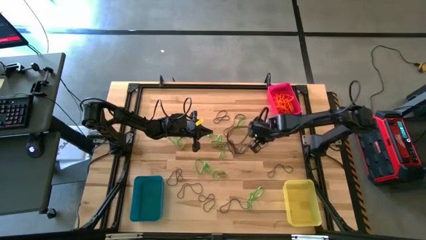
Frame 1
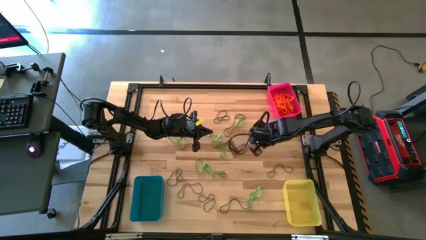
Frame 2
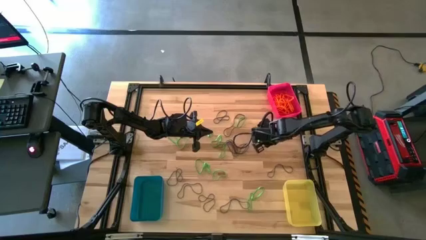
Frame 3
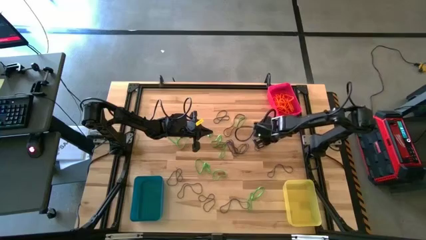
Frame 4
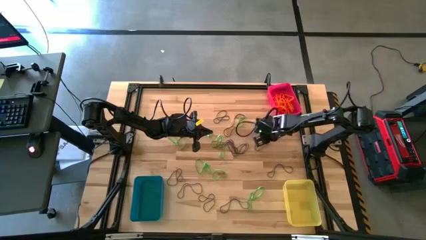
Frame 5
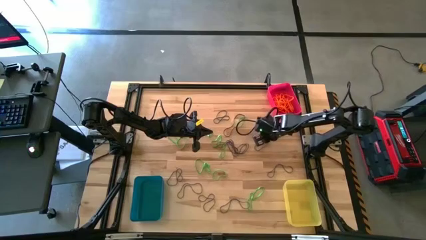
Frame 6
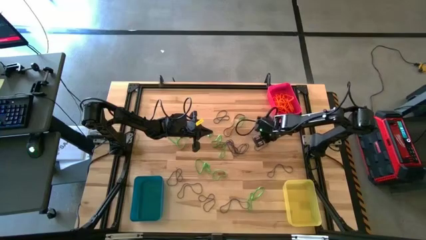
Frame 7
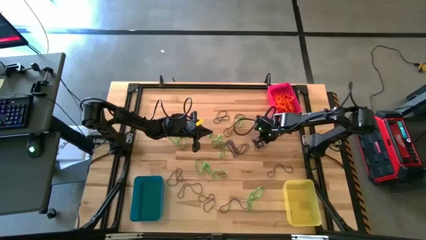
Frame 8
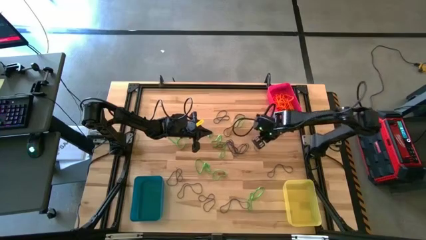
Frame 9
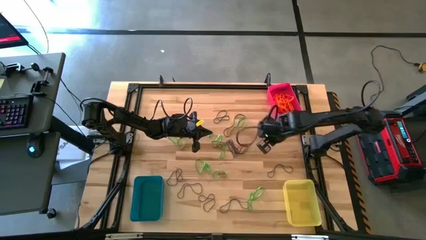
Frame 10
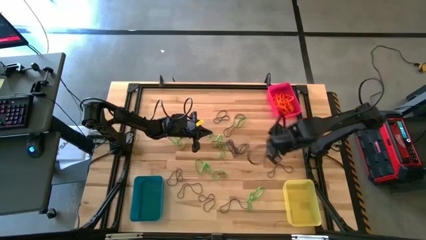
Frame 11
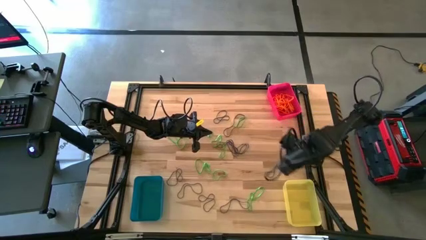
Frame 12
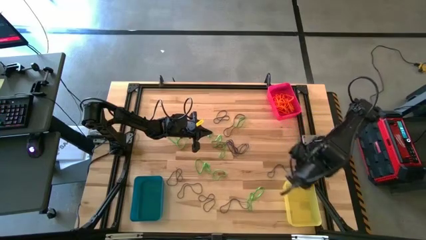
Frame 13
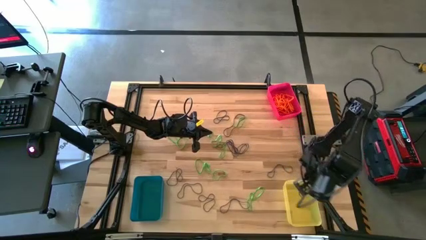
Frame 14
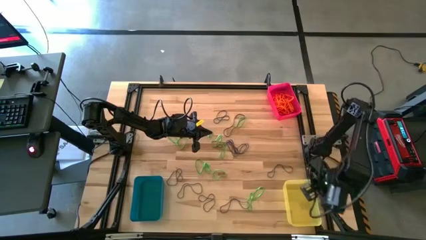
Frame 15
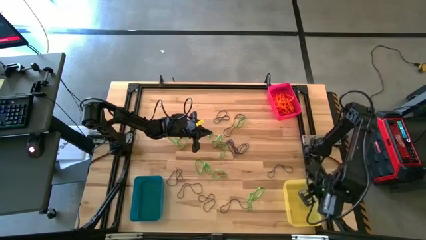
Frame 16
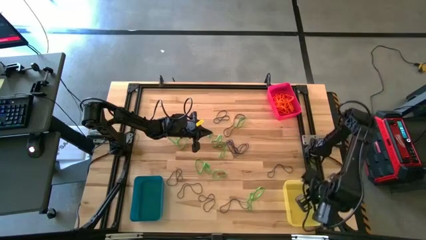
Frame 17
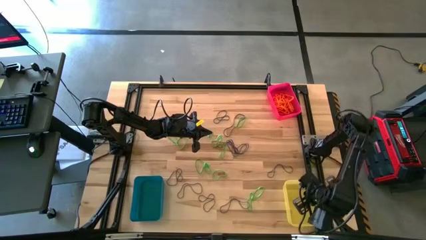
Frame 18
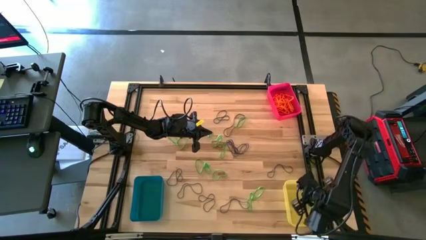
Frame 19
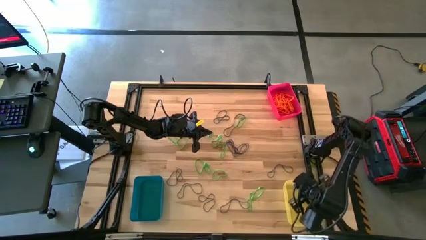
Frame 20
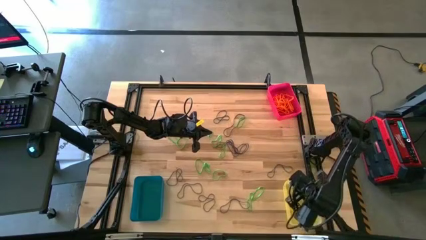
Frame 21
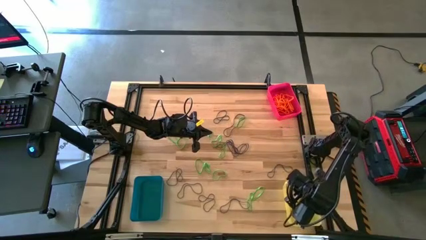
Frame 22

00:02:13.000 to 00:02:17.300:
Task: Sort rubber bands into baskets
Put the purple rubber band into the yellow bin

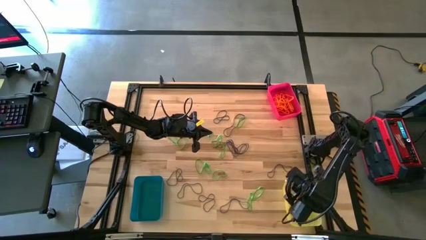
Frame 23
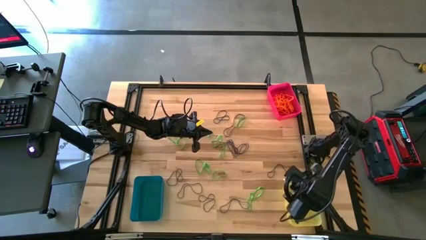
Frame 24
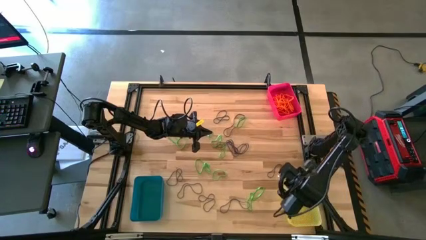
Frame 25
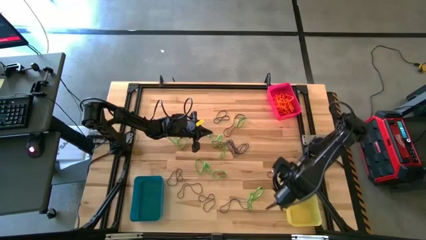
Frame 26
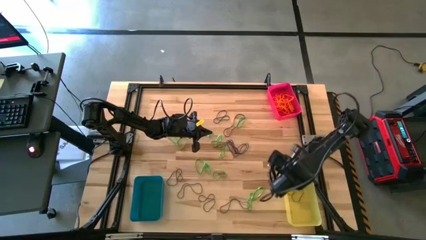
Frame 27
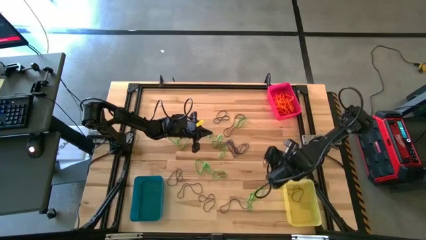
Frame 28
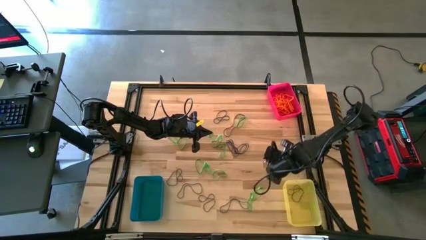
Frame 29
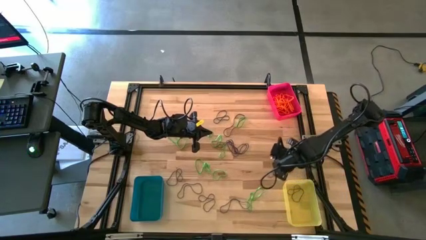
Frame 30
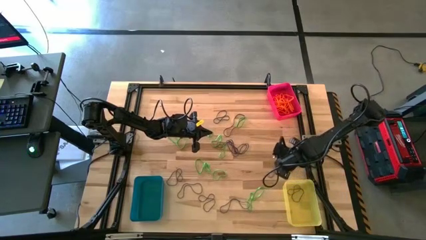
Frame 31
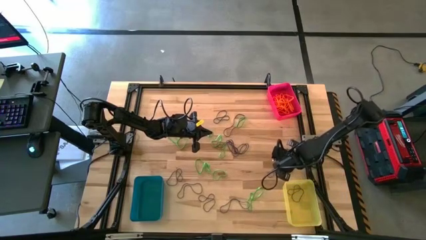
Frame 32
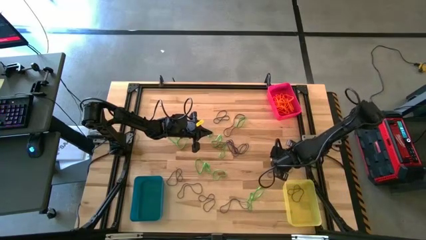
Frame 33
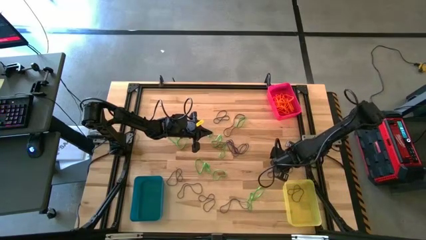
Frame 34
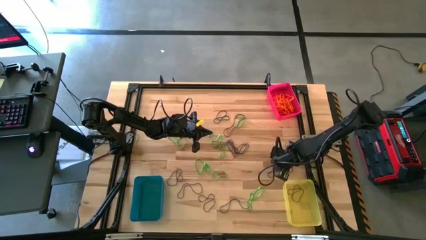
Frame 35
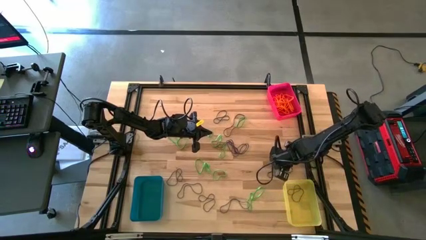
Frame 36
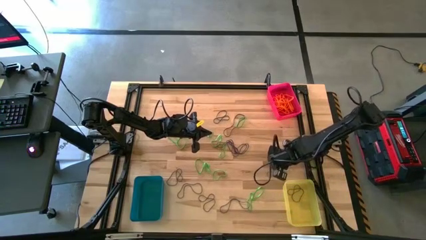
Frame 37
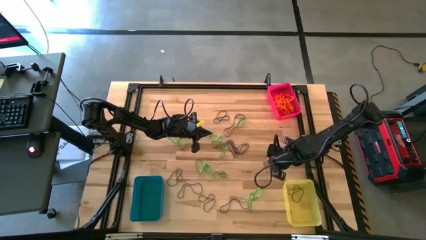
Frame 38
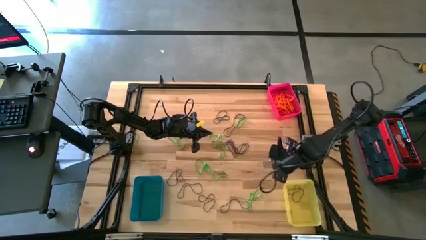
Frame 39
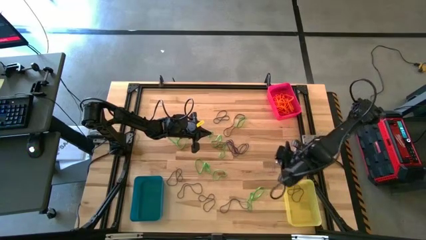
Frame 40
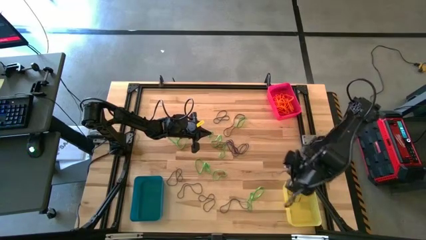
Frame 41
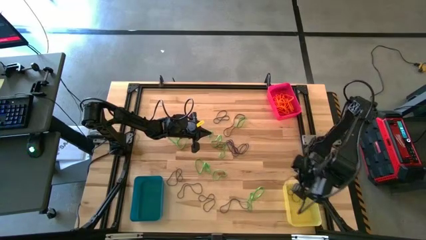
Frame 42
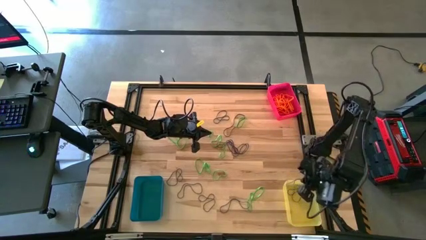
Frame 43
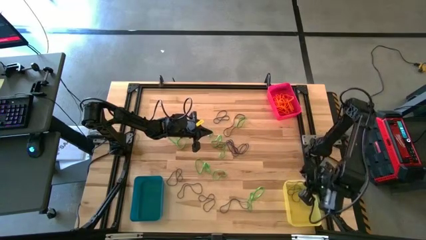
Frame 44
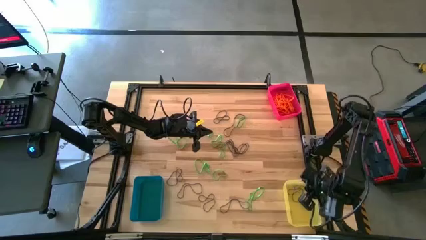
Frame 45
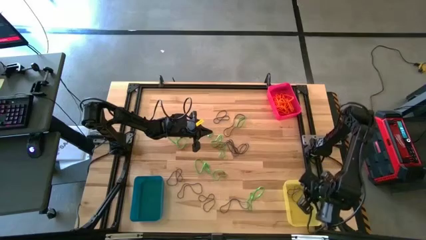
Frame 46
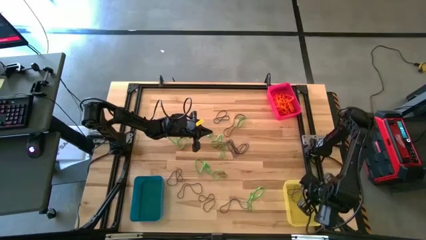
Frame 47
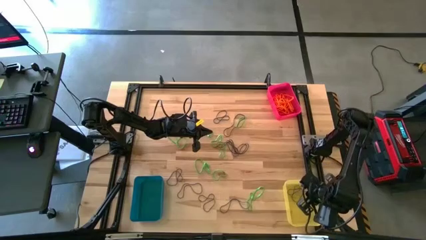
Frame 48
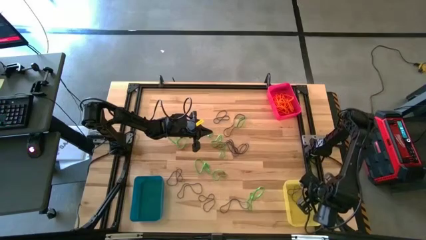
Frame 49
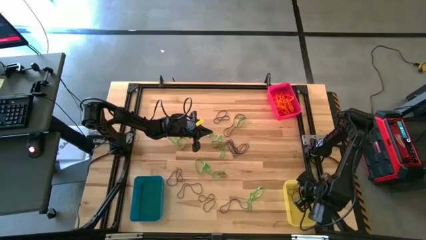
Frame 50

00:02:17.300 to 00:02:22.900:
Put the purple rubber band into the yellow bin

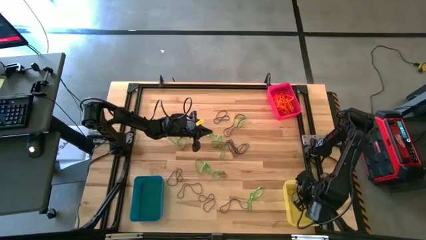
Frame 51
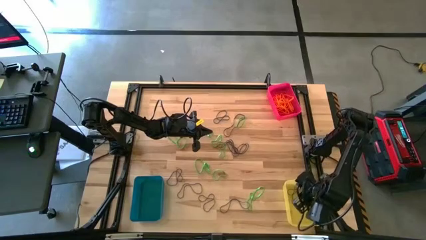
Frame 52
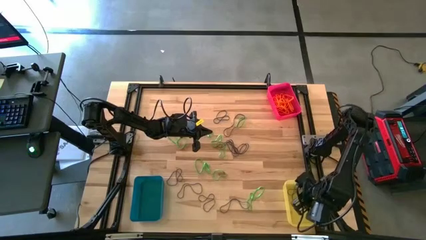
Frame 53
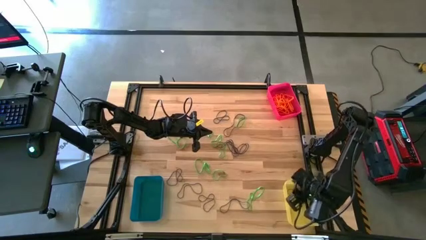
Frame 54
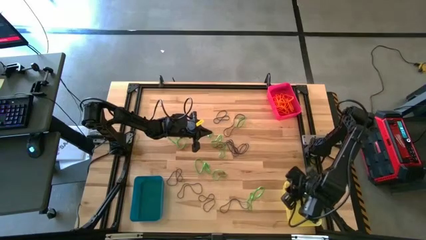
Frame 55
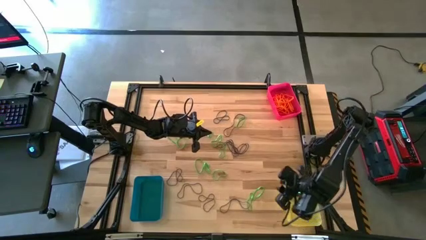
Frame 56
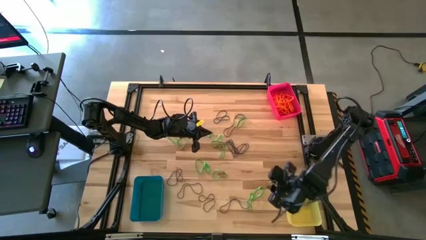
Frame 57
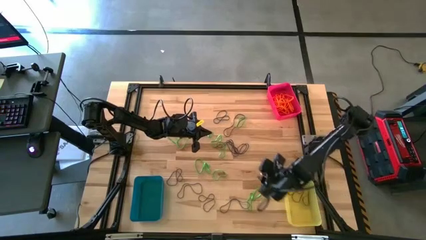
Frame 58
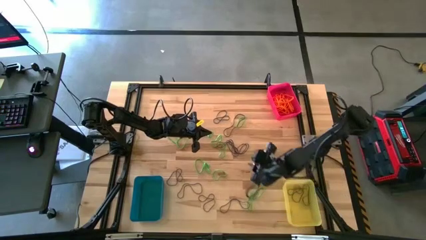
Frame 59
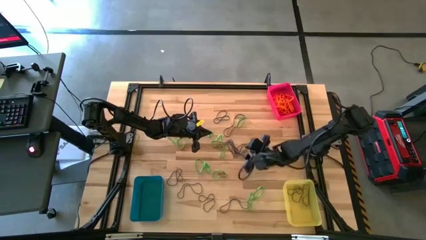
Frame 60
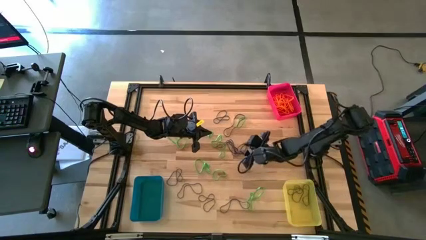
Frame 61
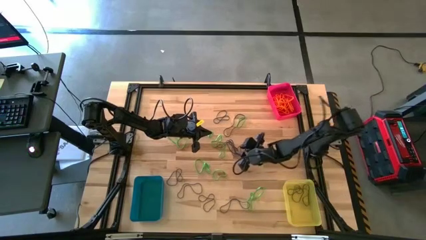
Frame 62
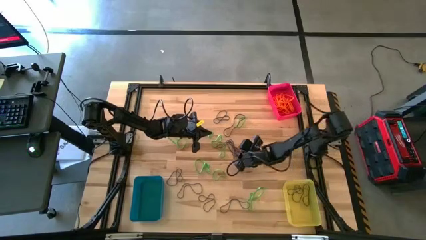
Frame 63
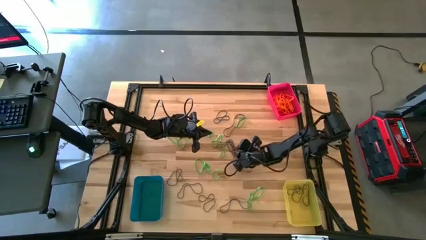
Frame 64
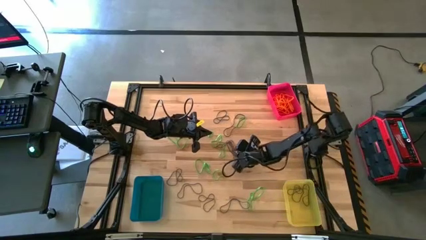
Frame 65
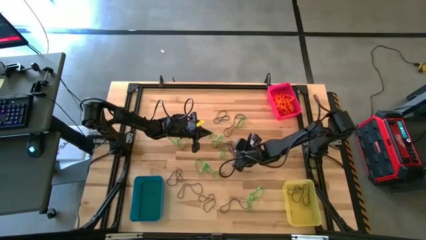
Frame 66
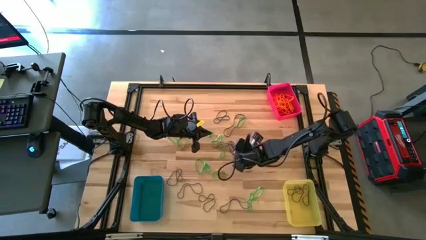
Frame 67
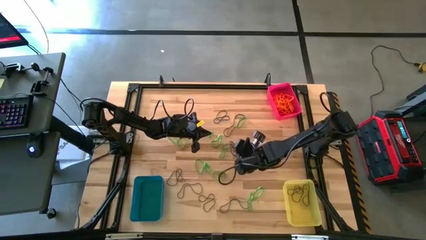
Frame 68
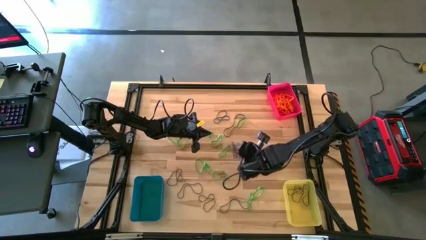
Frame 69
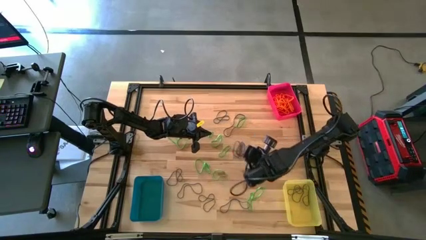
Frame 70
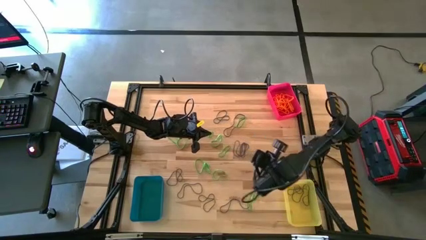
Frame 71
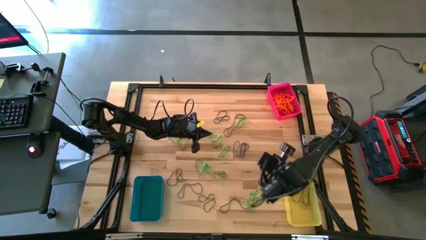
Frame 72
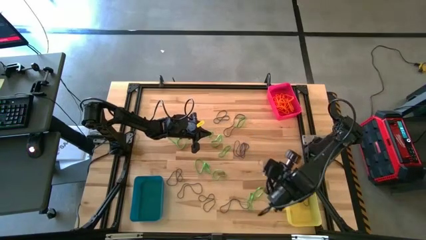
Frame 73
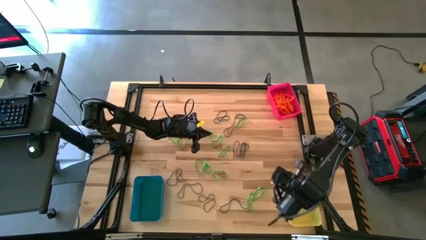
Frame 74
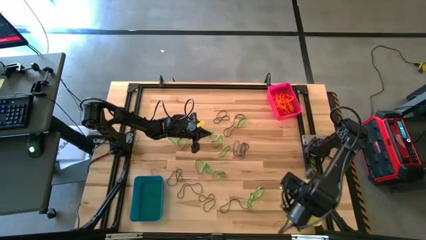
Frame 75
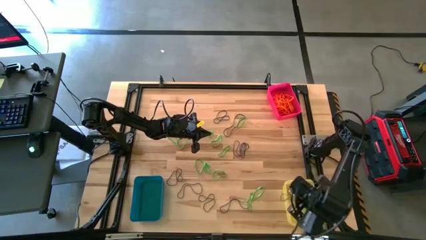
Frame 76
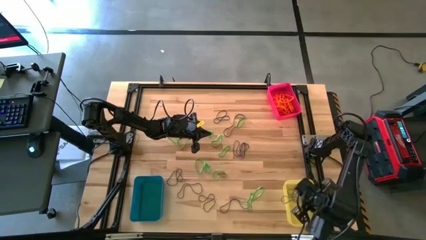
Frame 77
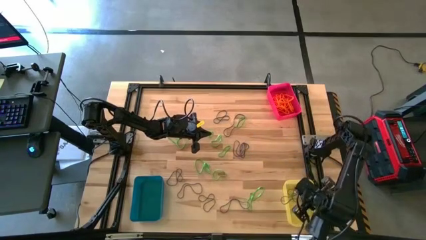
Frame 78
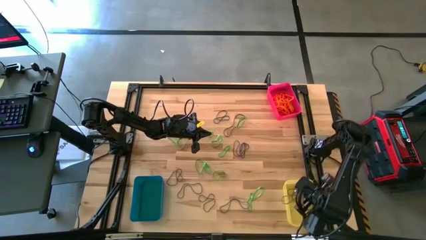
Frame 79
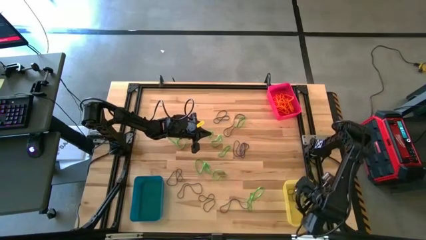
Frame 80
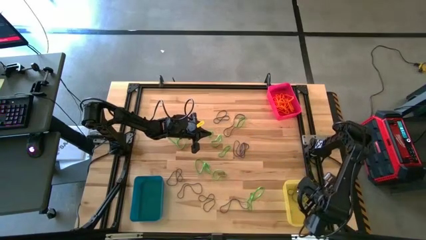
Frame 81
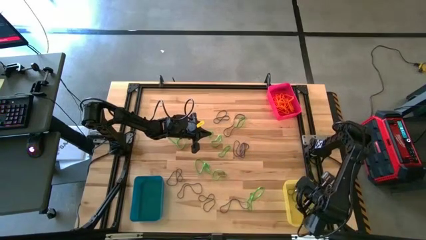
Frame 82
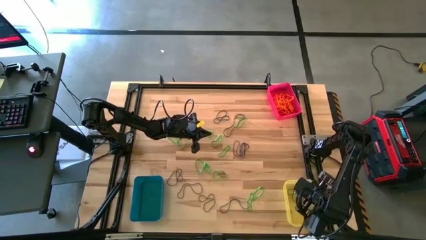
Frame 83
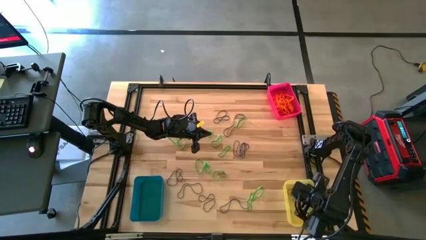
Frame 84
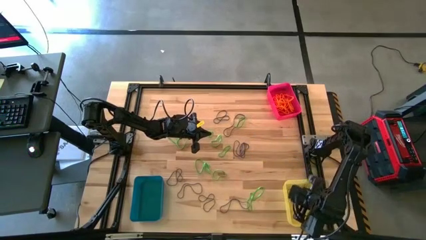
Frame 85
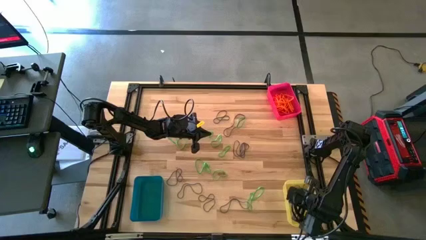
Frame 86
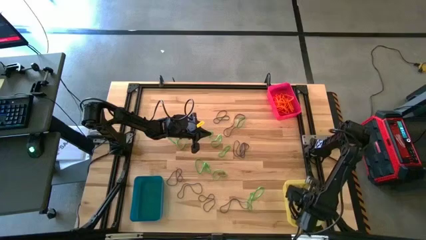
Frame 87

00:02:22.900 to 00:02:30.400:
Put the purple rubber band into the yellow bin
